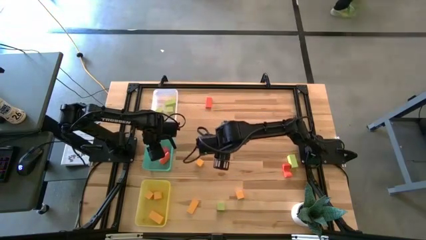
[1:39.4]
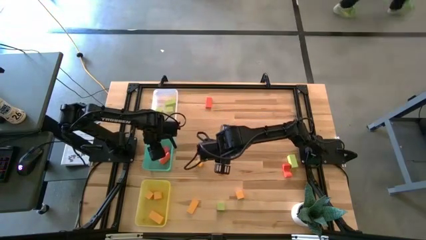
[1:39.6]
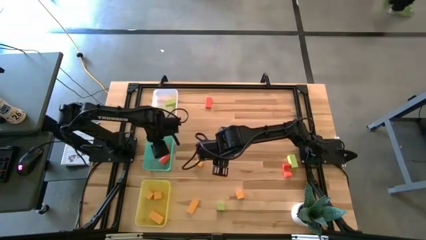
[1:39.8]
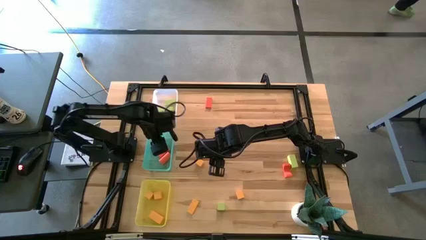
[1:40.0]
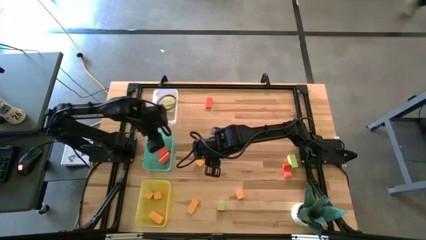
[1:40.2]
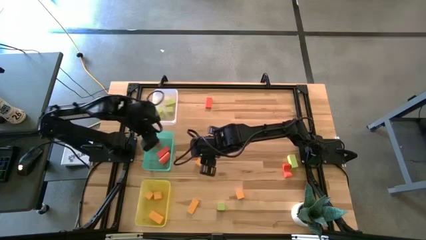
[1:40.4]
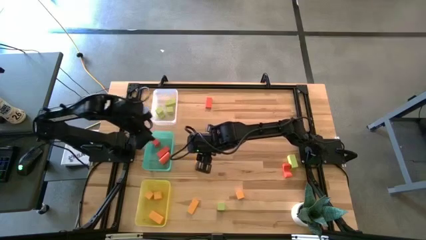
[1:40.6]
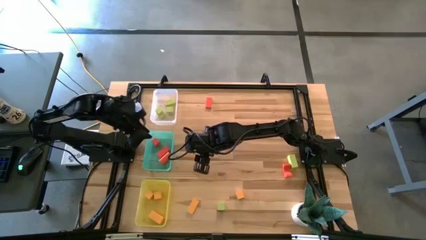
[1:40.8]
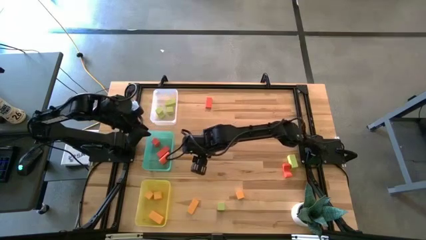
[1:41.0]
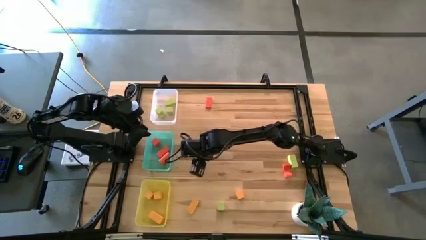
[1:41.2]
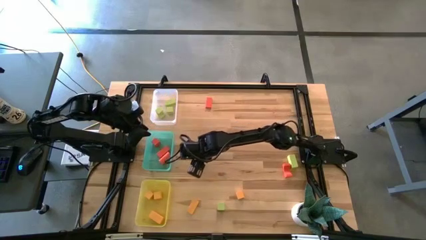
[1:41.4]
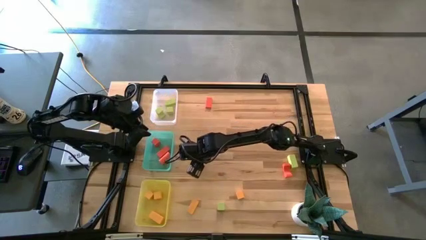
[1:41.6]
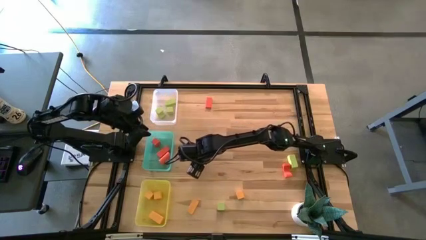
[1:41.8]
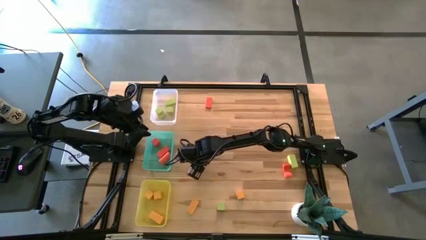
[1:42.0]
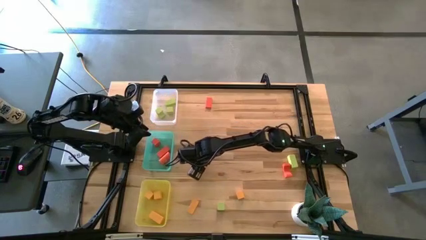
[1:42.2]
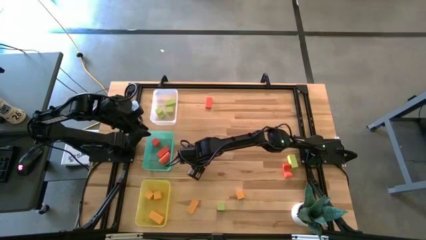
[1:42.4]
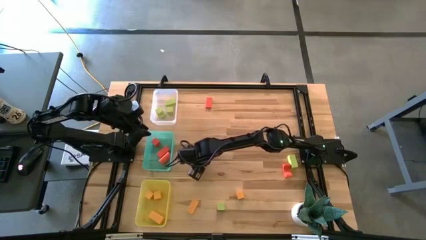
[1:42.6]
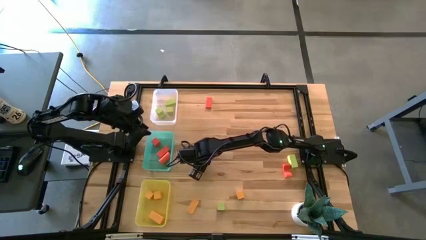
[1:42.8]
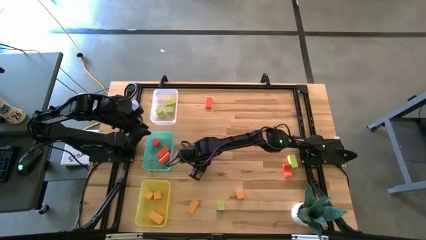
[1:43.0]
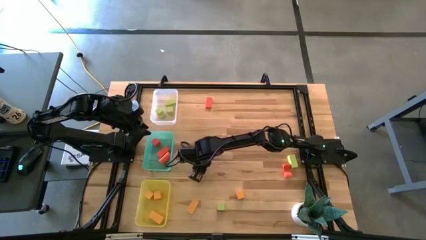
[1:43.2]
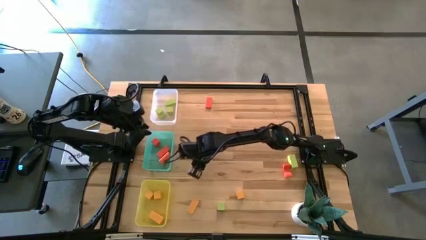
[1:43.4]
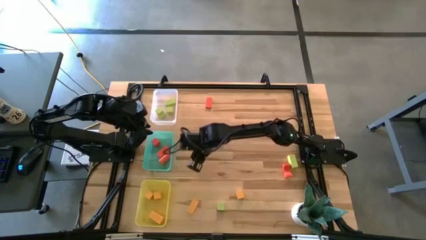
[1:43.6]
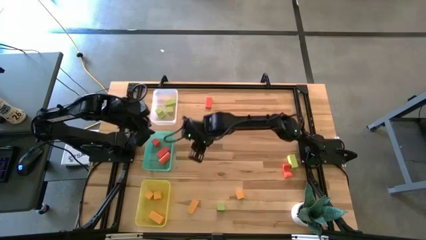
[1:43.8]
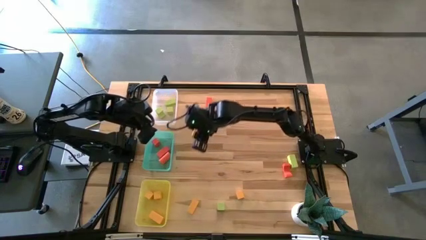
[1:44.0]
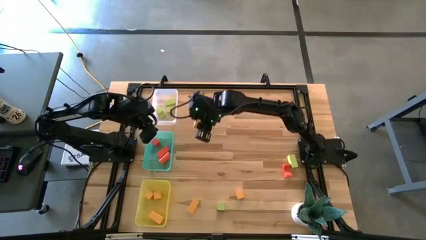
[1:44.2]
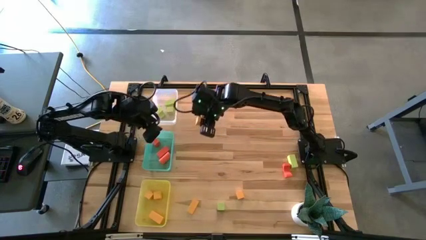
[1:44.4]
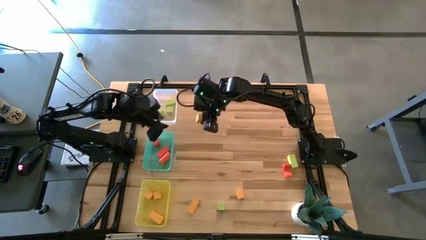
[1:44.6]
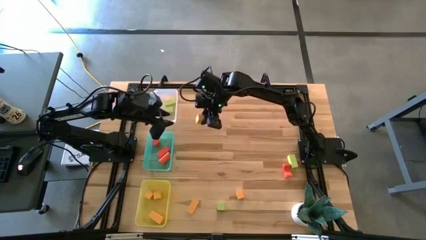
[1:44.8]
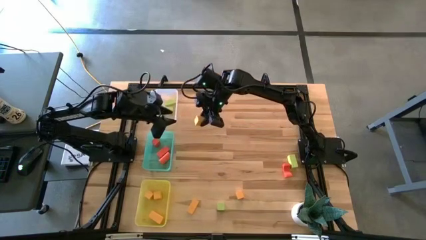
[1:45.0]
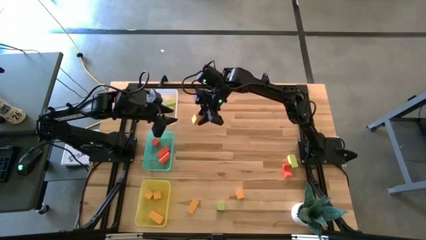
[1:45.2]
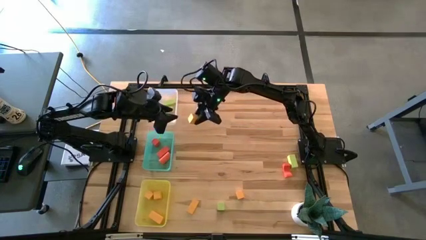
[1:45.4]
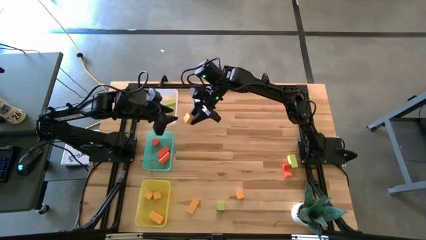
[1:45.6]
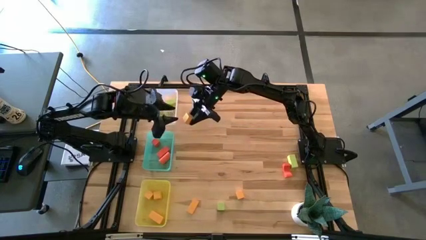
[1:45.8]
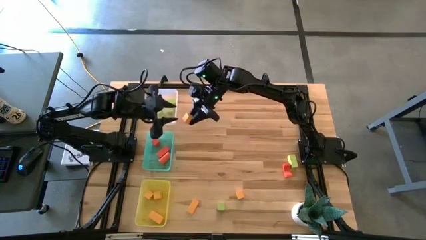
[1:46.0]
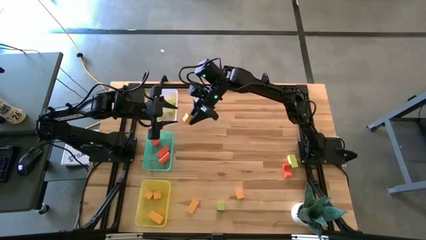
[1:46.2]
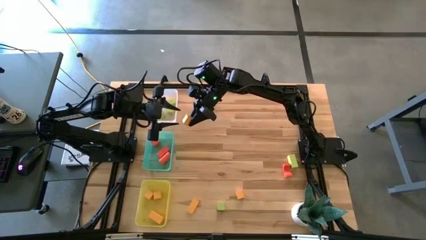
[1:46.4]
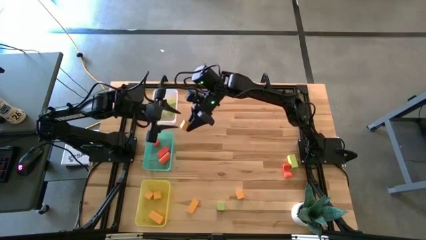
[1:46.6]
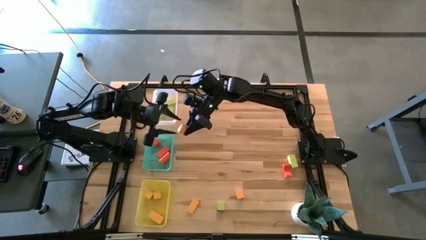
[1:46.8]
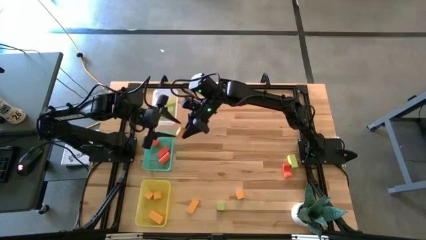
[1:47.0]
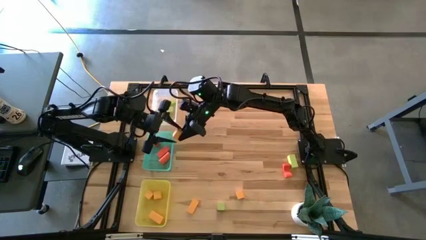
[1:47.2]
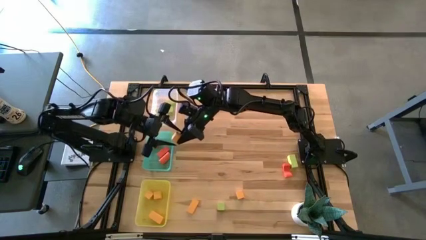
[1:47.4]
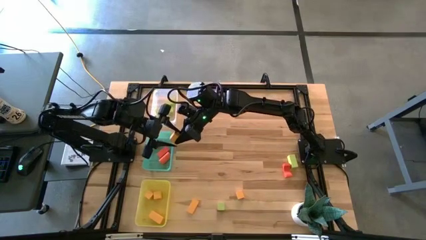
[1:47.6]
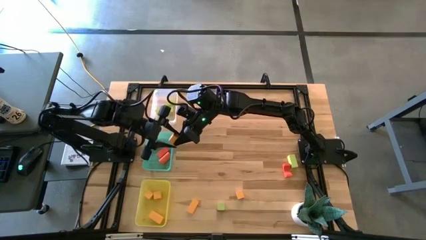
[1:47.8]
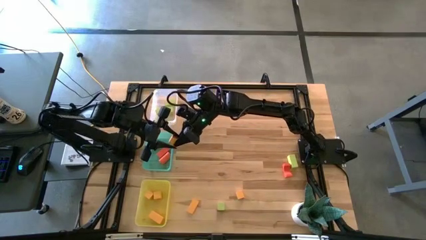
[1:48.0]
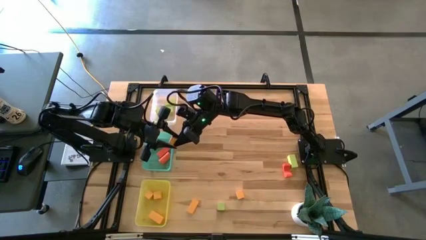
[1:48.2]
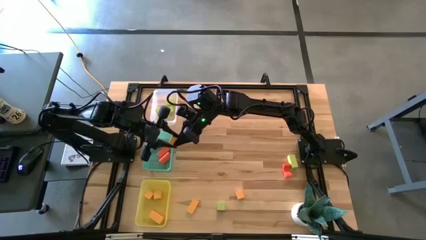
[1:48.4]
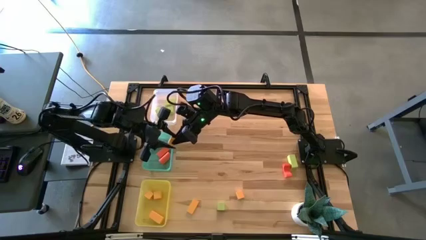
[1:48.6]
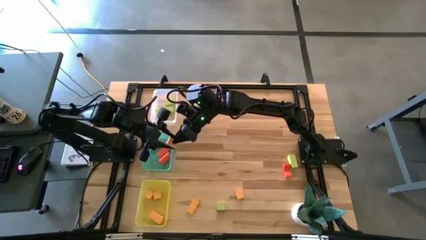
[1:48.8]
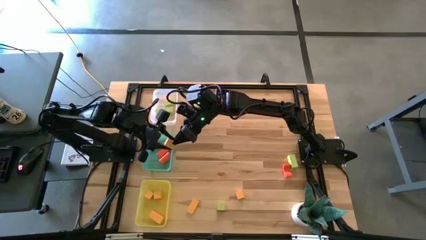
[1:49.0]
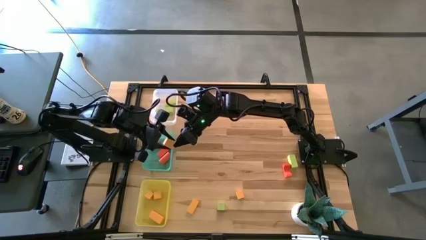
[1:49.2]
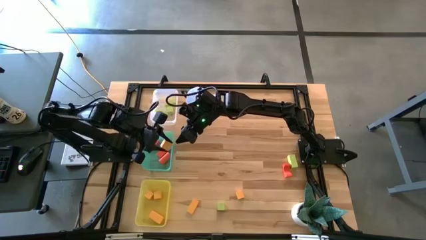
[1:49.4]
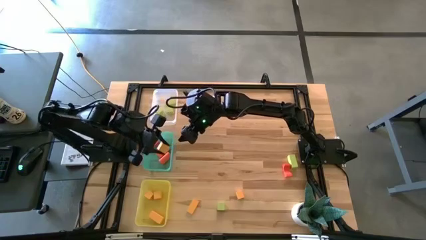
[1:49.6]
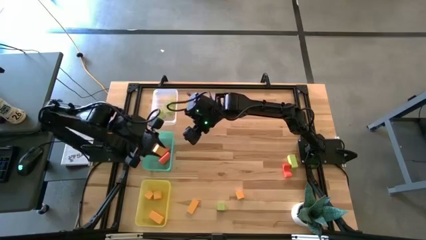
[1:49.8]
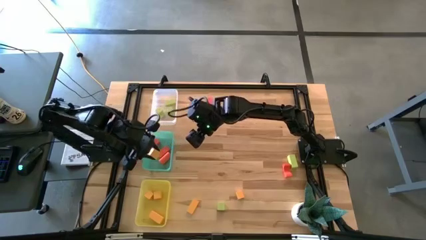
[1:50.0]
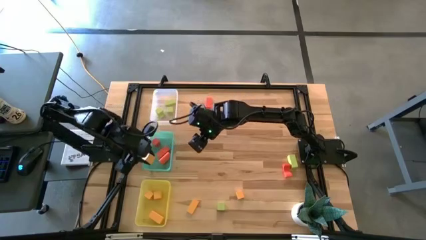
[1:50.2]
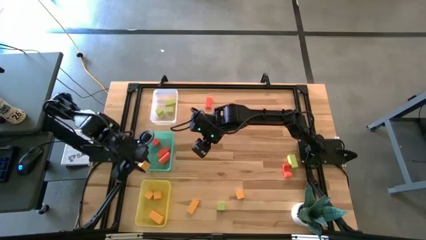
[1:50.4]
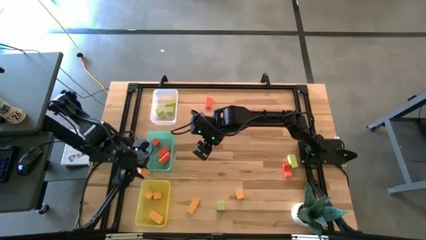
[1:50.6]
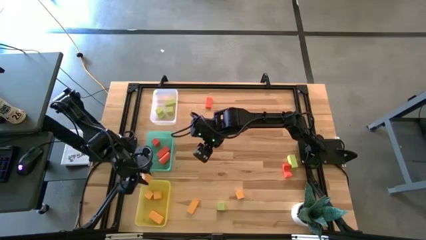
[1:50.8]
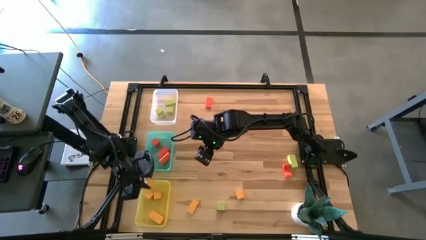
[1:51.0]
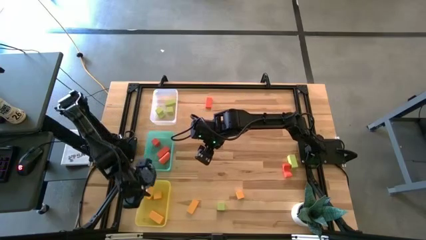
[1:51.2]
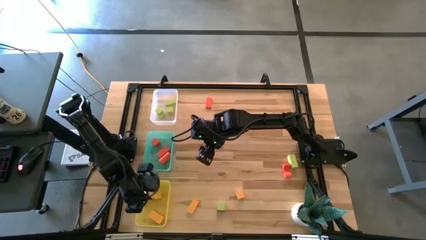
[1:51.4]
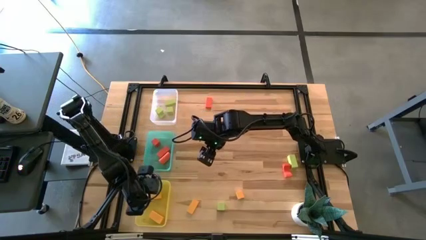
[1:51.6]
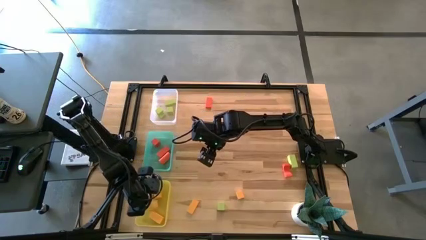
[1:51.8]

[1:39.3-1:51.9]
Task: Sort & place blocks by color
Put the yellow cube block into the yellow bin

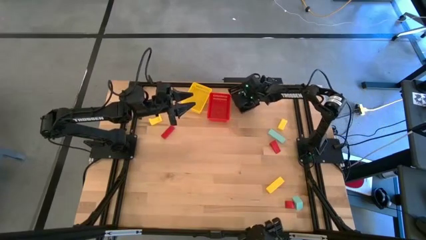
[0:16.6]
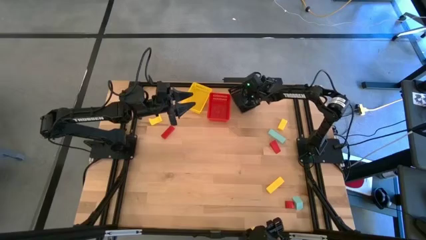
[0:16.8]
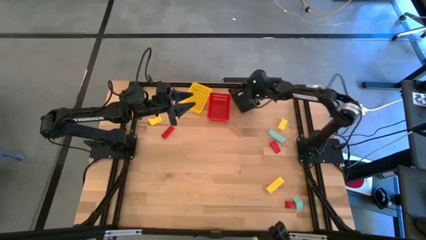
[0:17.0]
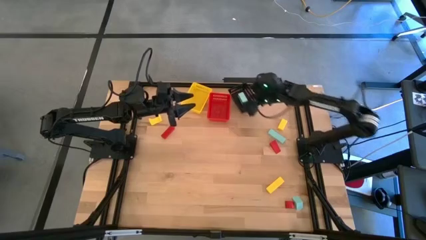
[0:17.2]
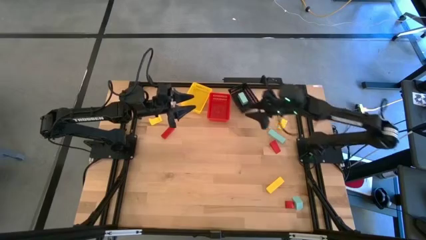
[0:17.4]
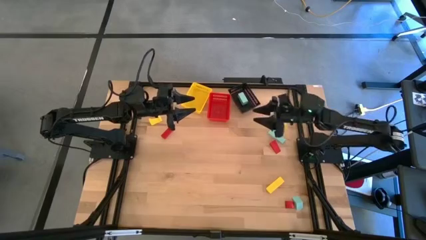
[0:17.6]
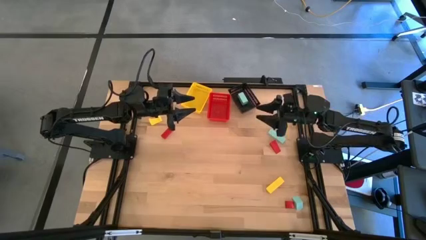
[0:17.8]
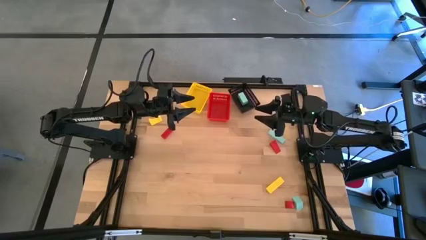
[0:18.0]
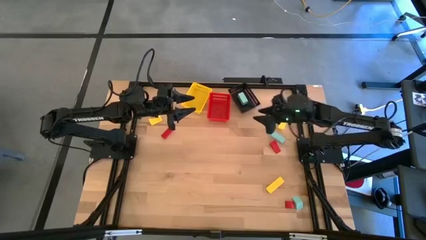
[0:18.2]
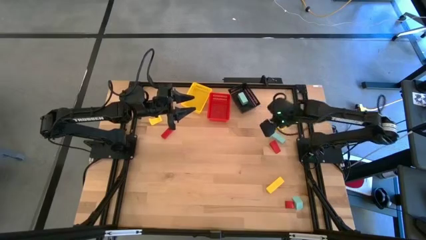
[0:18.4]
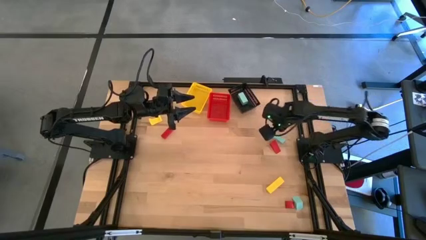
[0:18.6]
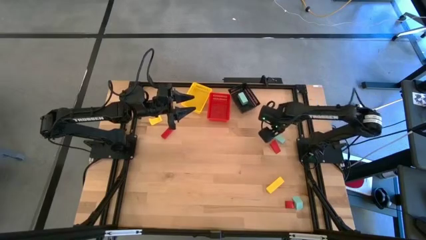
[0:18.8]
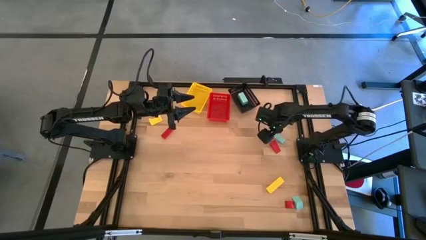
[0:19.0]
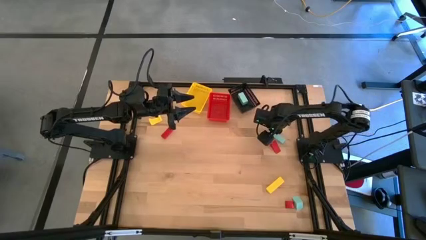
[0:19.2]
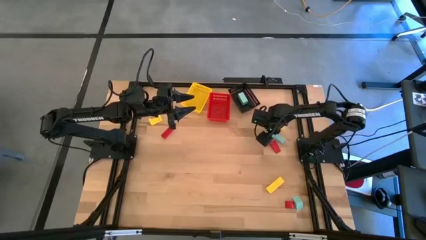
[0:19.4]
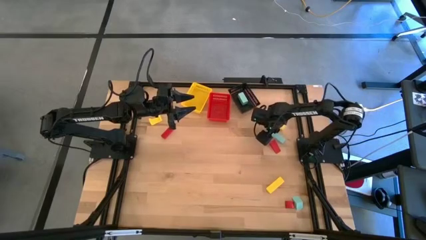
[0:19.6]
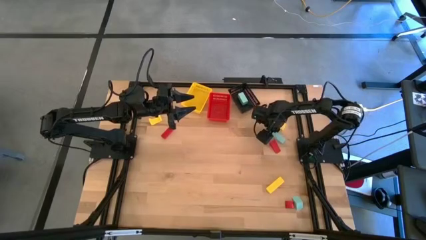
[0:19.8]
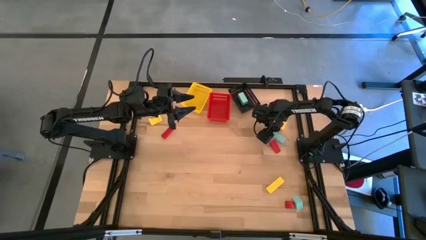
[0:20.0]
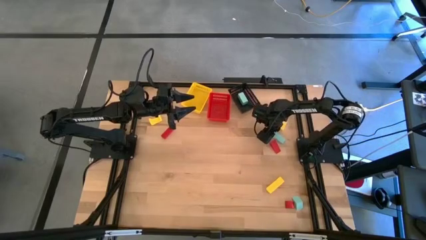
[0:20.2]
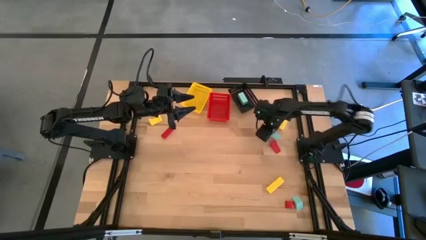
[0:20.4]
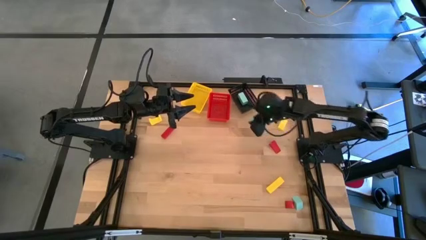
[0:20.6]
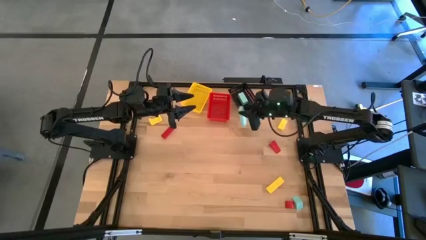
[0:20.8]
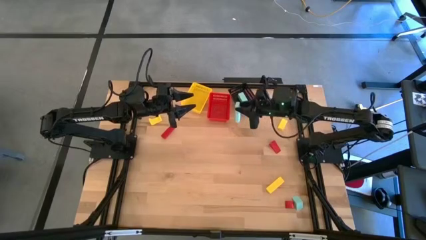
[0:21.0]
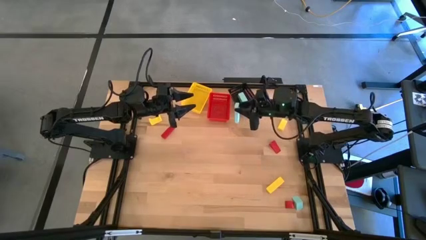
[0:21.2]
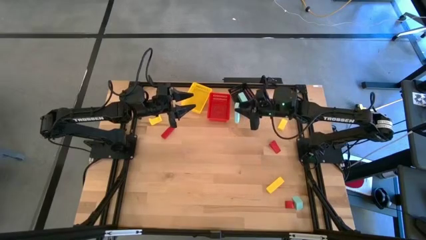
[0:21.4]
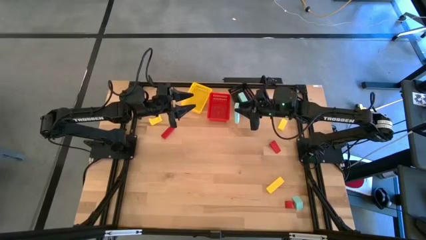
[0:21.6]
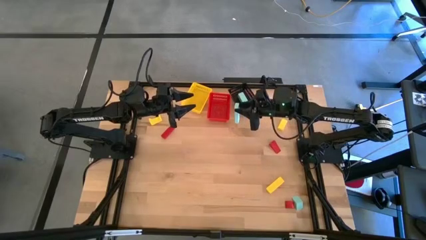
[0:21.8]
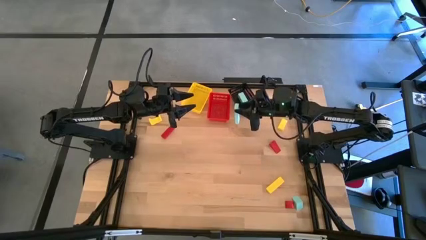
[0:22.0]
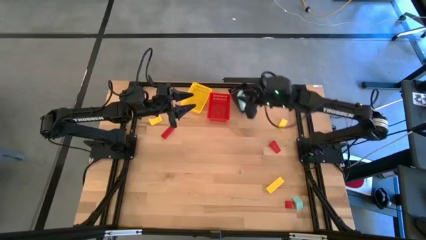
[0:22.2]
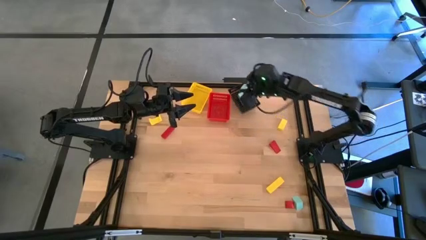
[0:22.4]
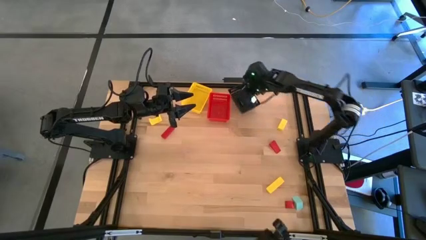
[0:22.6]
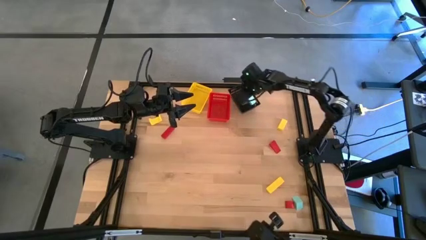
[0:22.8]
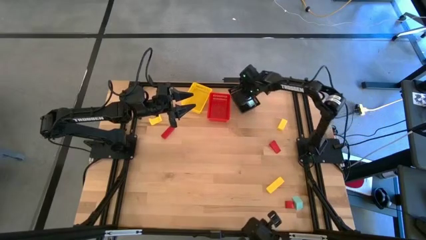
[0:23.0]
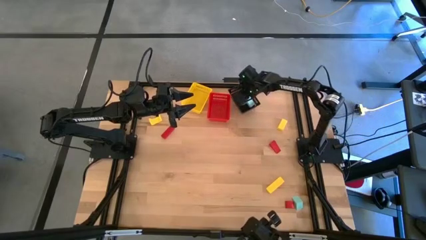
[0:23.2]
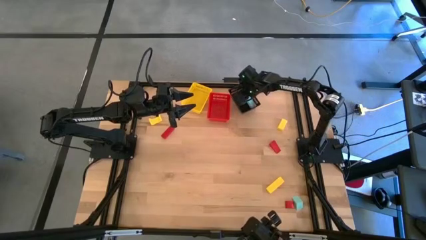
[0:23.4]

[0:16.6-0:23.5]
Task: Sort & place blocks by color
Put the top blue block into the black bin
